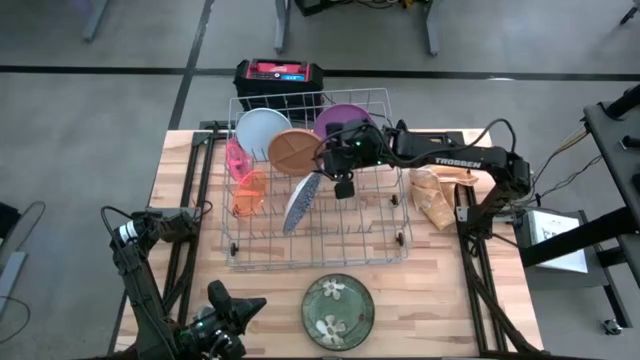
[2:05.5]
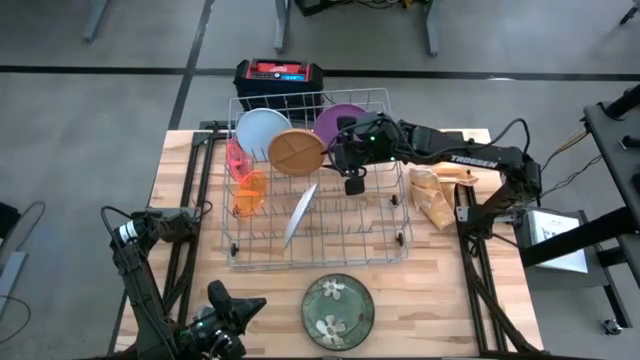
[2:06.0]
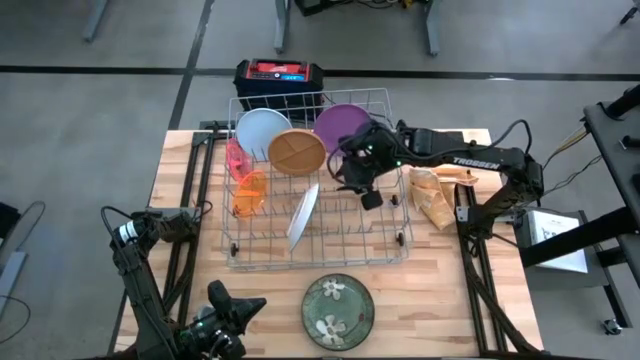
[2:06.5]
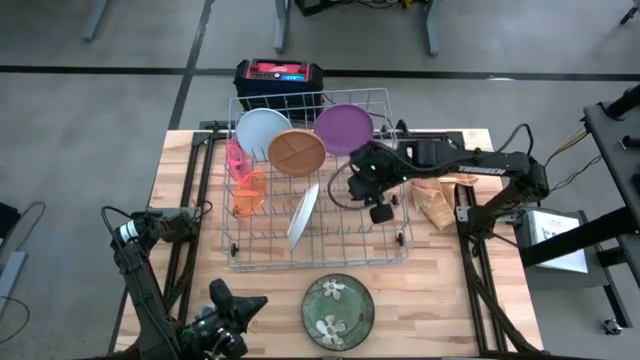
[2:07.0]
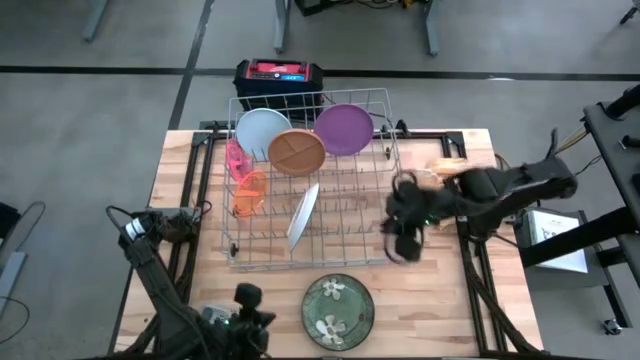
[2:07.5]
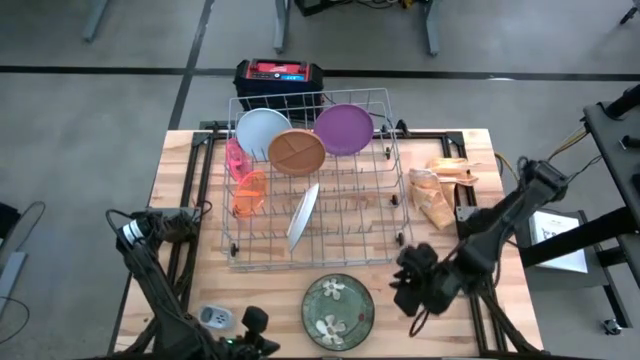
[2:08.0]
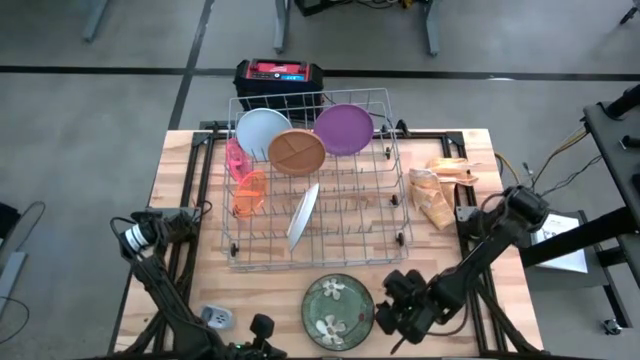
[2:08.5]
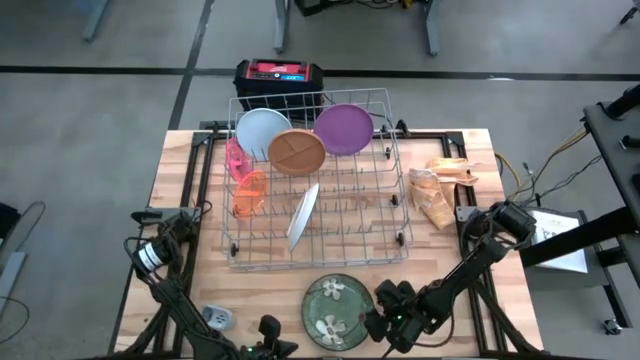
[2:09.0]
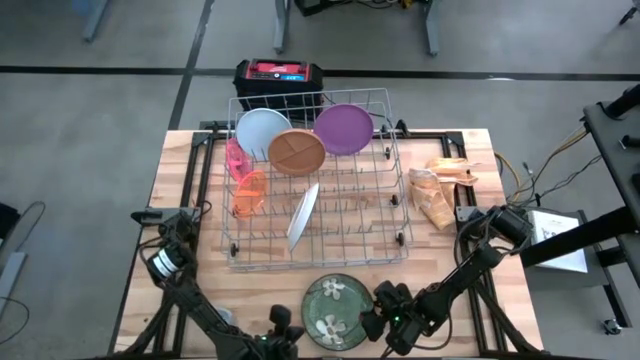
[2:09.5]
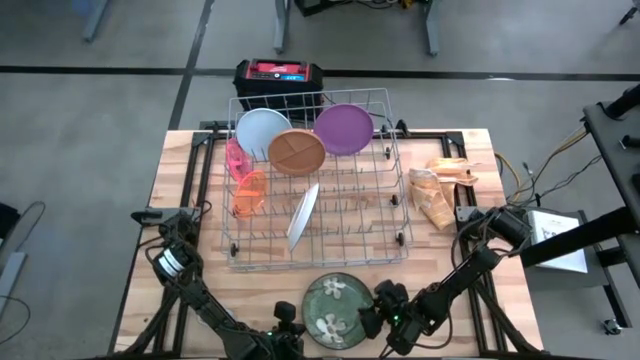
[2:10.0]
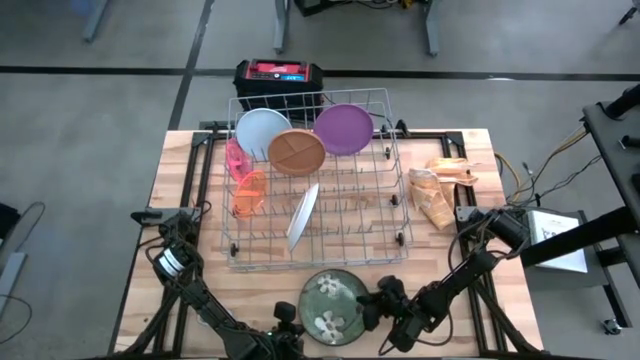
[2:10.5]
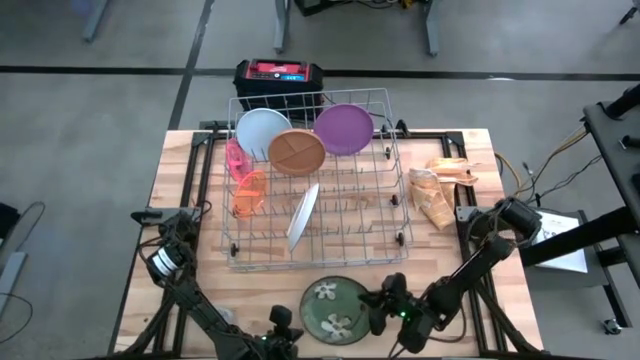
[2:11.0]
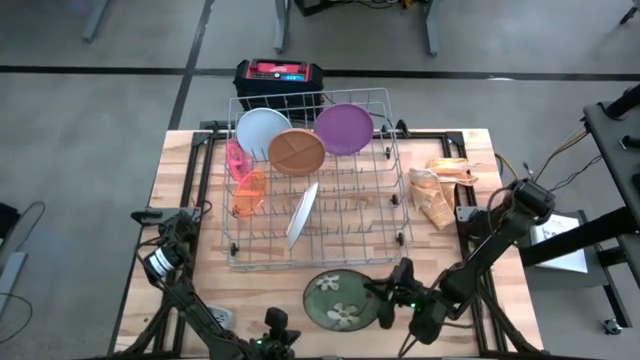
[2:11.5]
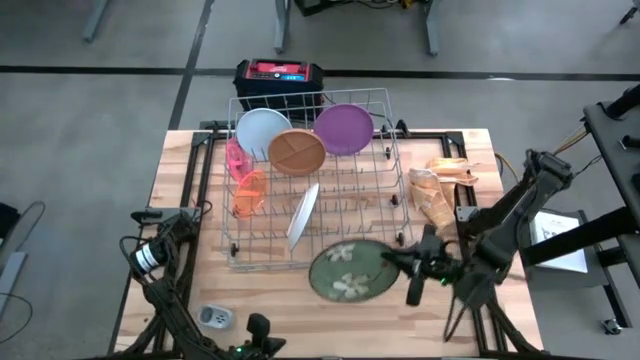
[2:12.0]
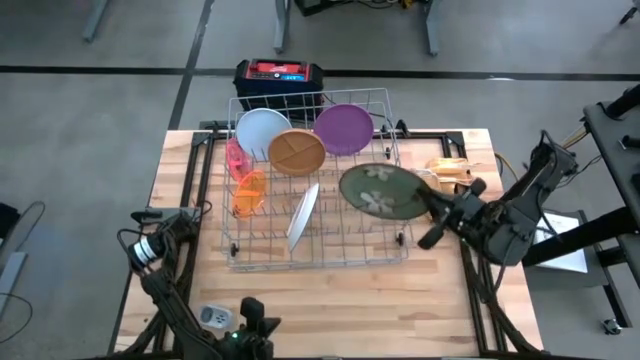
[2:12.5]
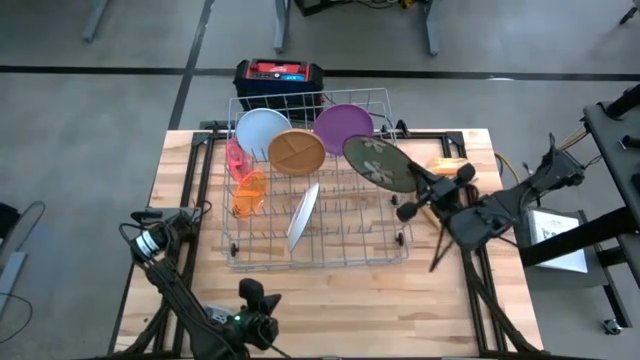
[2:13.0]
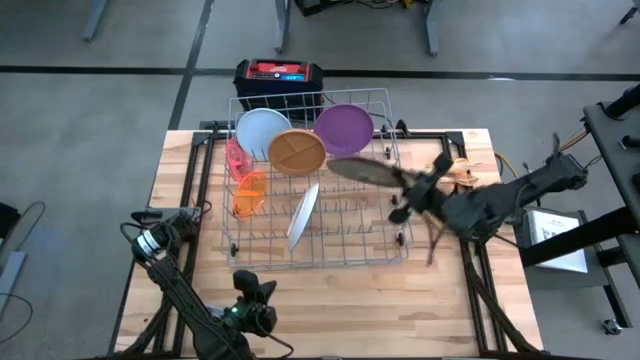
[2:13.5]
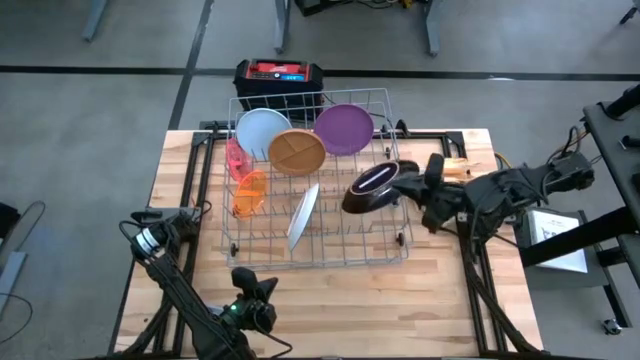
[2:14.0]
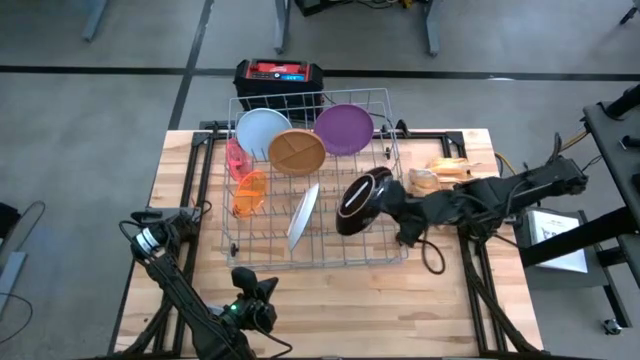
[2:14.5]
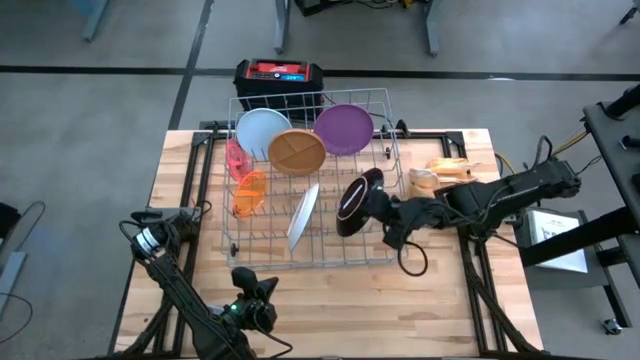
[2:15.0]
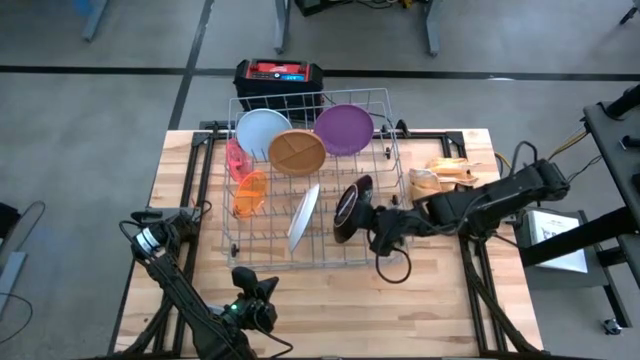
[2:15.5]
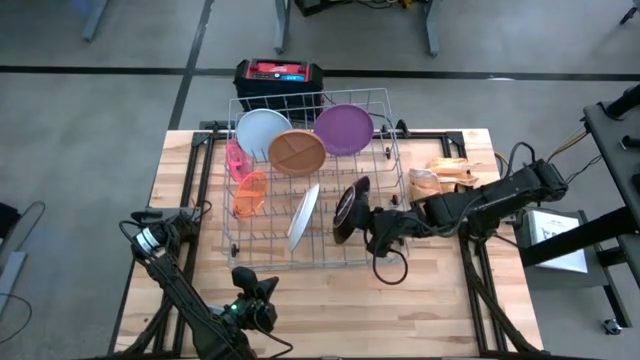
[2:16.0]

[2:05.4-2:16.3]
Task: Sort dishes
Put the green plate into the dish rack

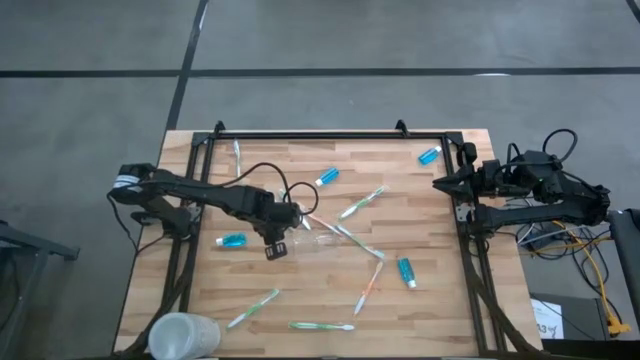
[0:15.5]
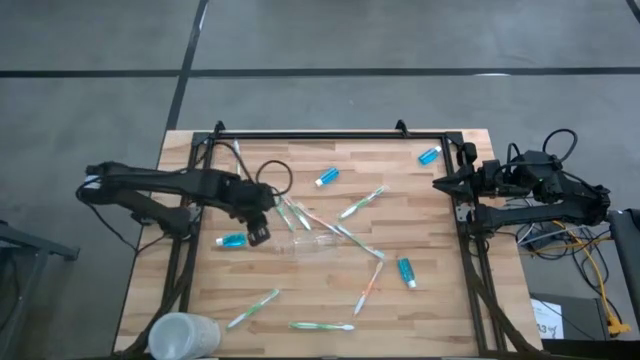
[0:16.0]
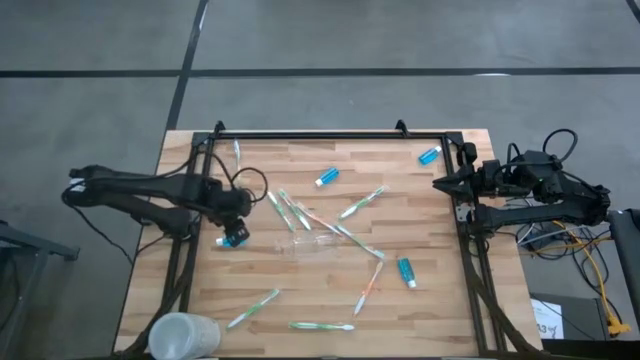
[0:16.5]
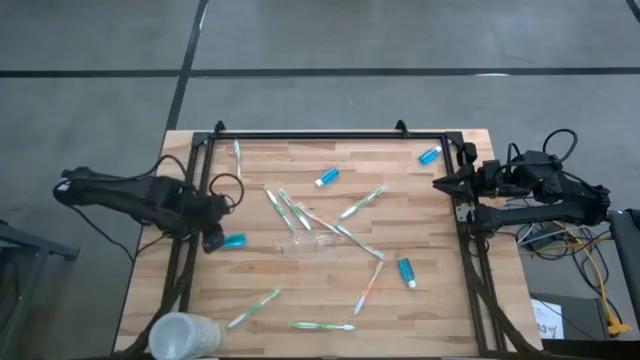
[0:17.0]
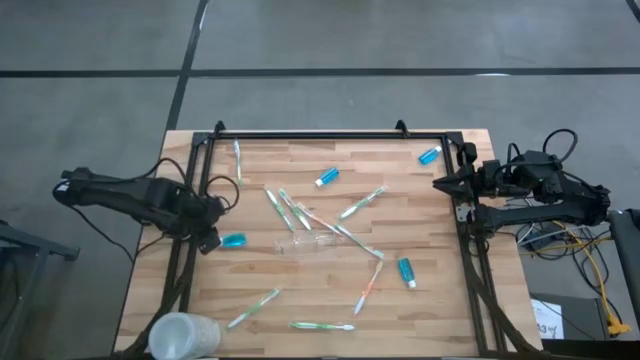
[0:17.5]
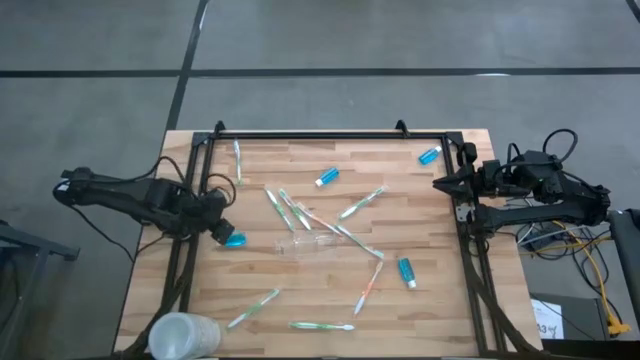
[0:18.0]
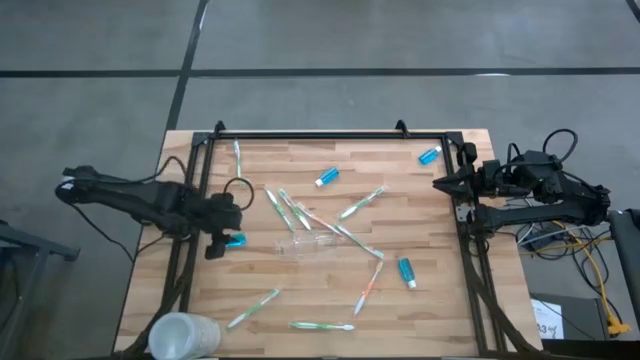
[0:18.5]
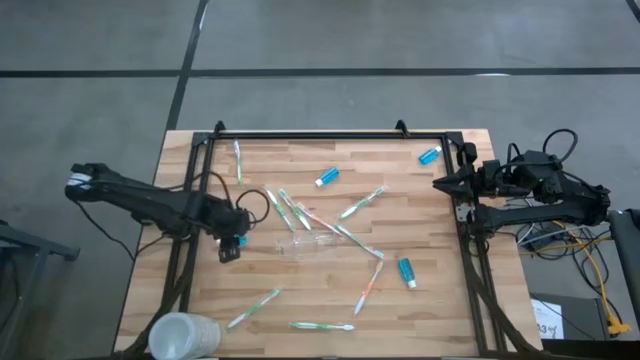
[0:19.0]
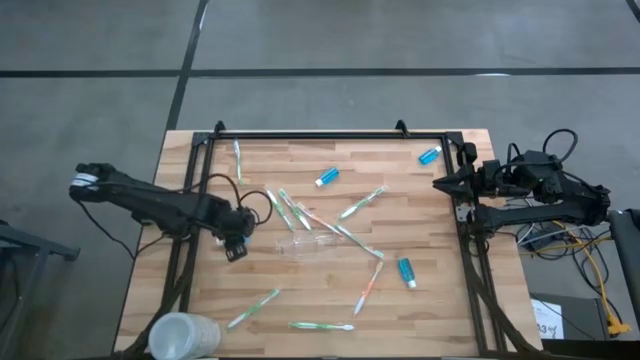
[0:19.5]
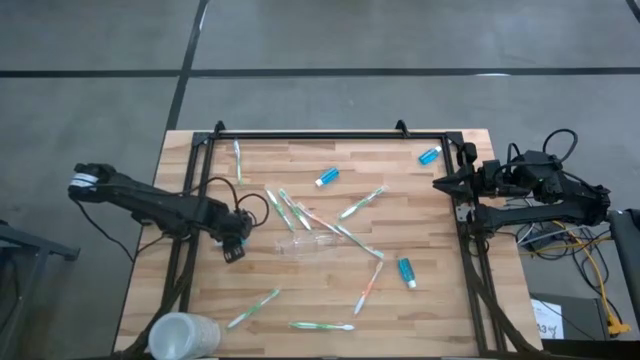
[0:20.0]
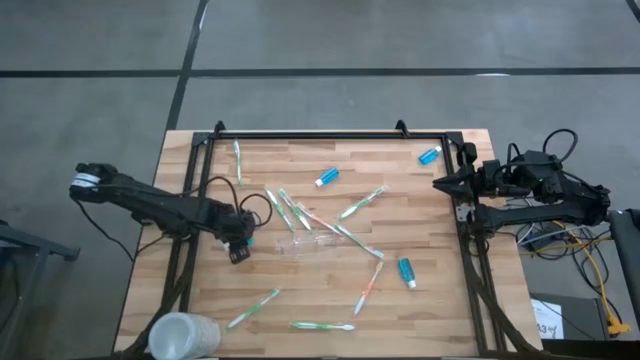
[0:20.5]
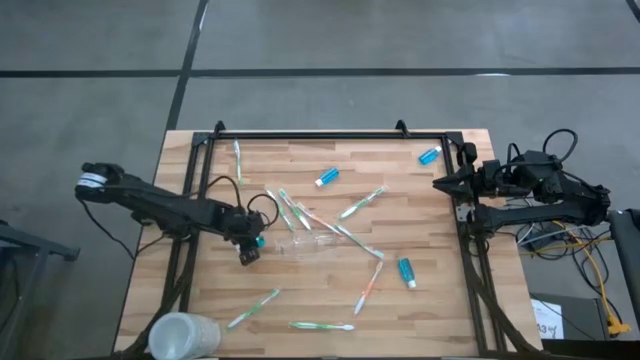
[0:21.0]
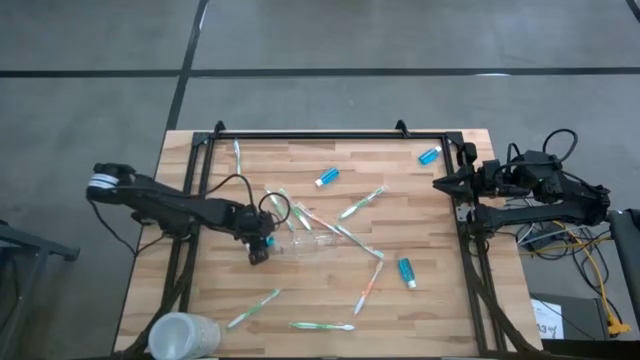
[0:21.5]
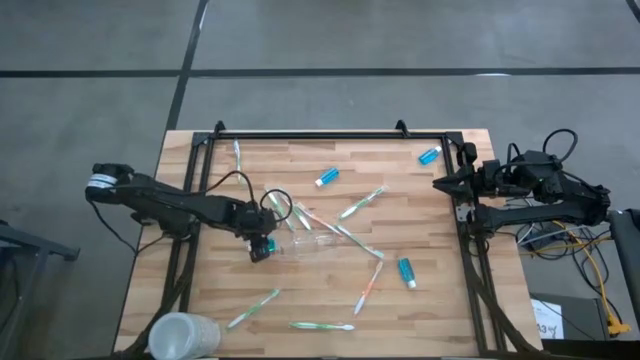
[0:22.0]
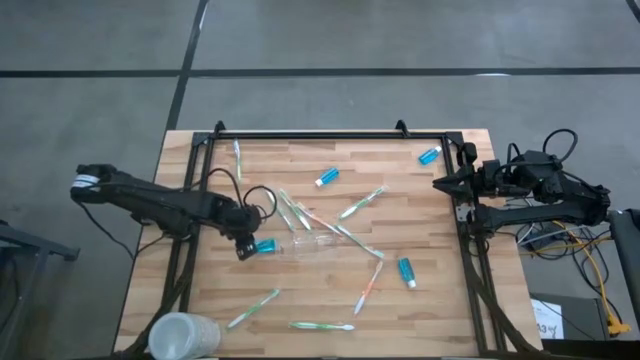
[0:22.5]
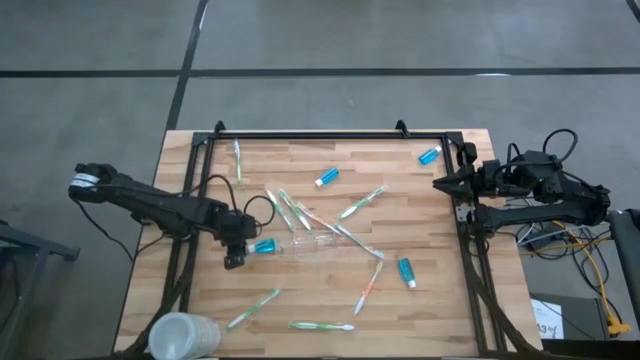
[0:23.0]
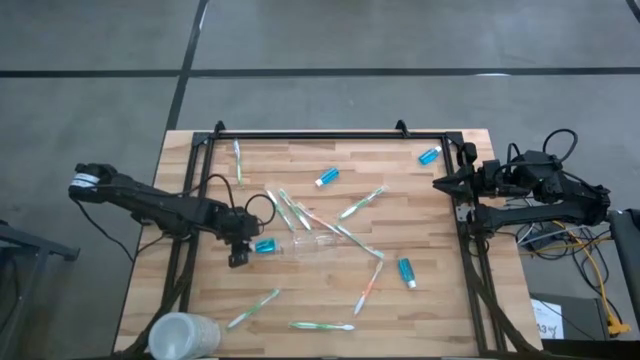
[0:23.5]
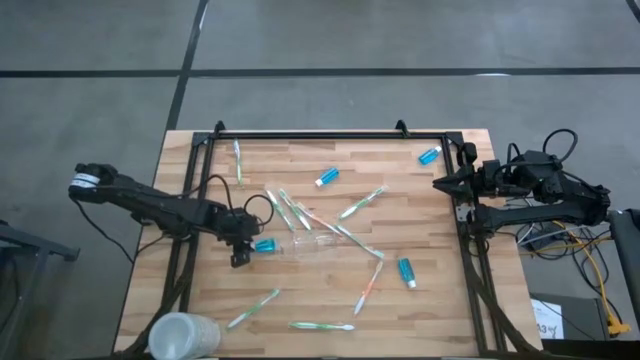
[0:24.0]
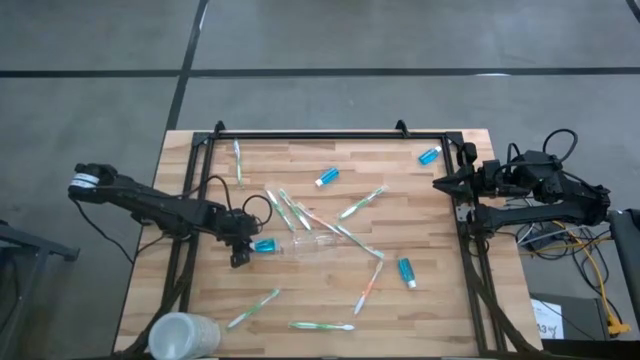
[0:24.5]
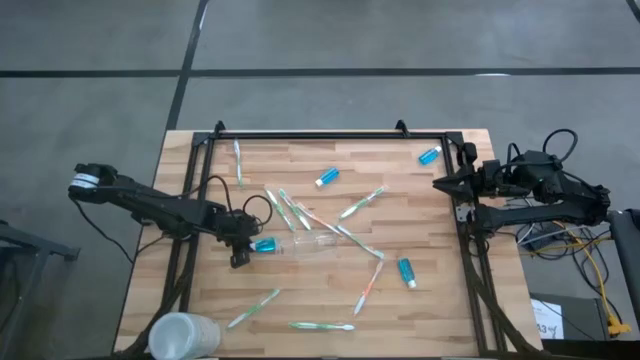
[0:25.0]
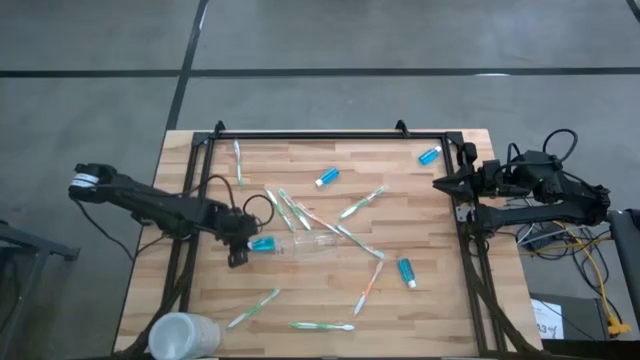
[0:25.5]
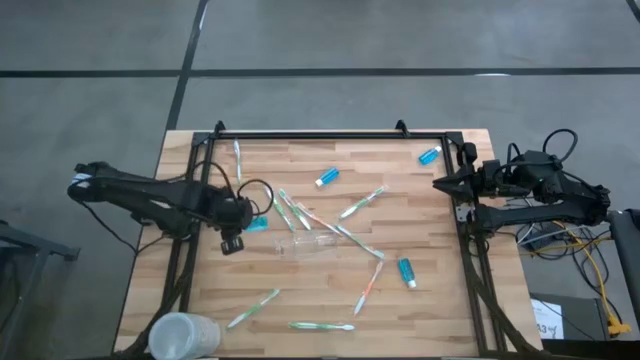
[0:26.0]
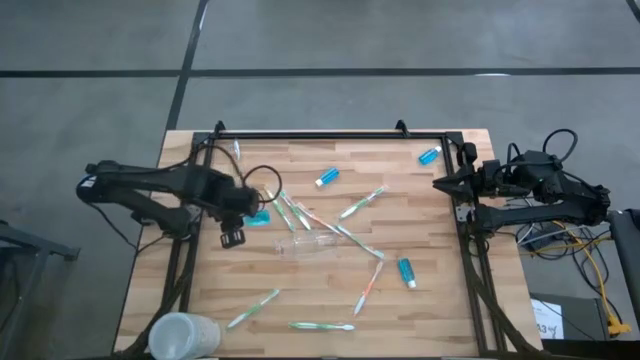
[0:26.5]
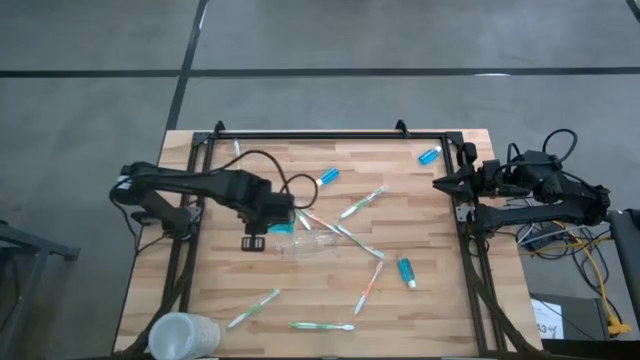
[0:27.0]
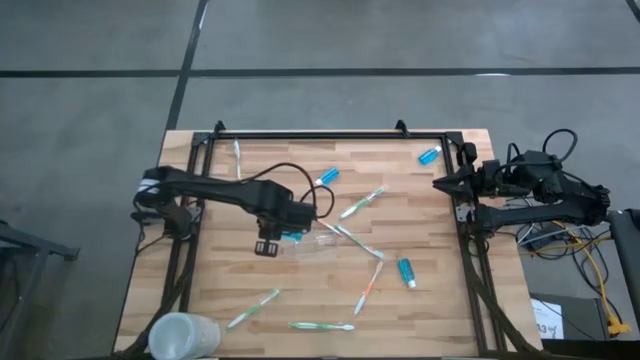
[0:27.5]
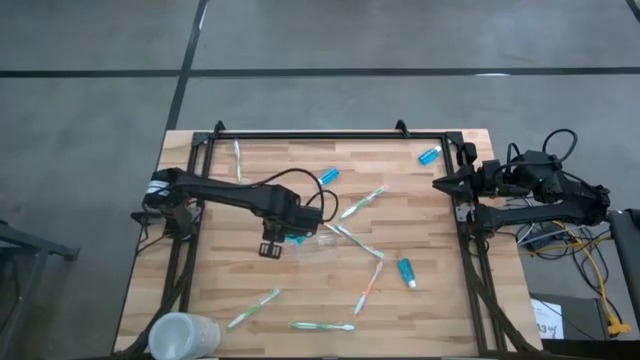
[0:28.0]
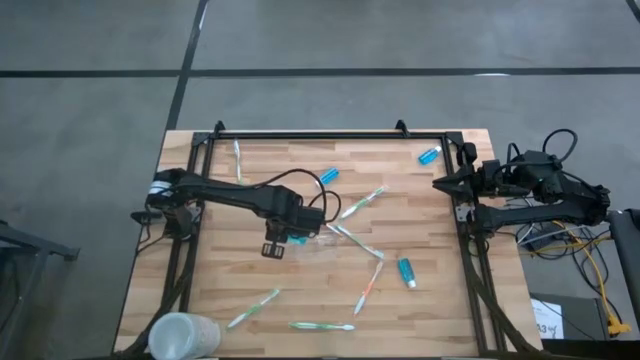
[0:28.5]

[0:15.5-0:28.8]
Task: Pick & Place toothbrushing station
Put the blue mouthwash bottle into the transparent organizer
